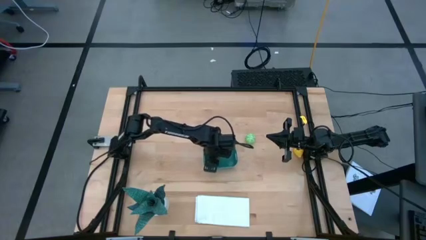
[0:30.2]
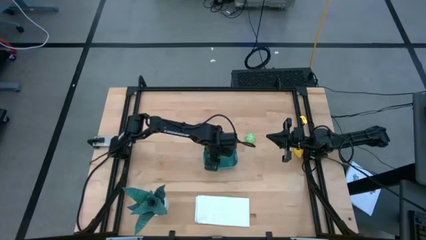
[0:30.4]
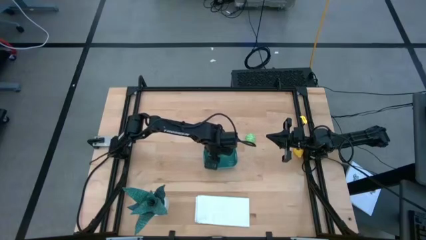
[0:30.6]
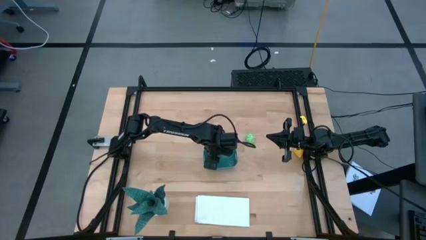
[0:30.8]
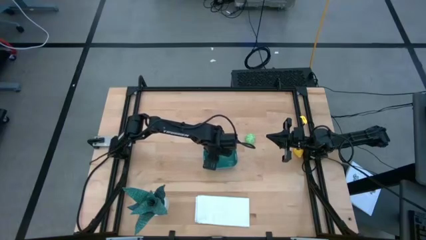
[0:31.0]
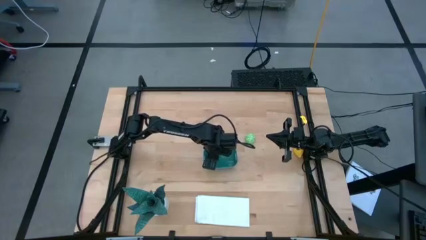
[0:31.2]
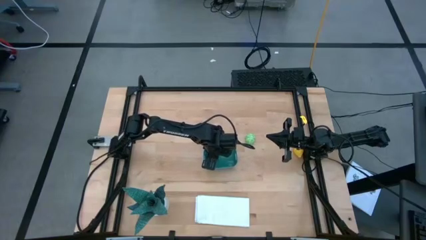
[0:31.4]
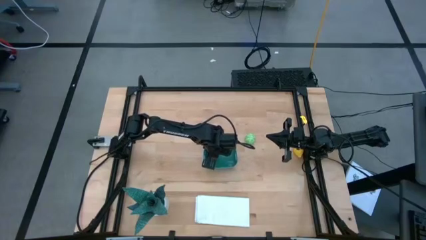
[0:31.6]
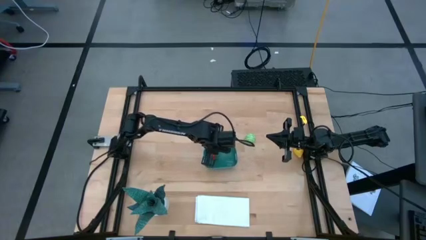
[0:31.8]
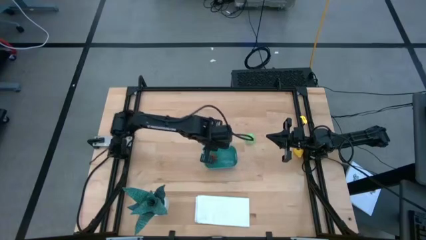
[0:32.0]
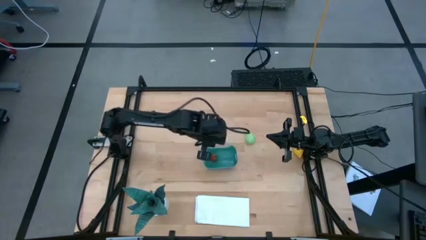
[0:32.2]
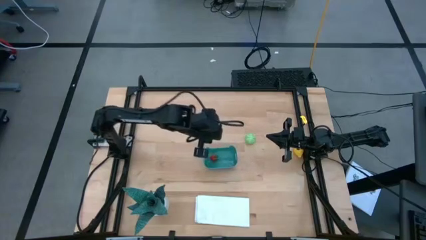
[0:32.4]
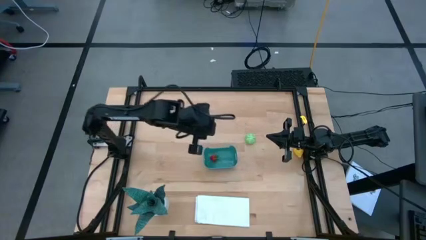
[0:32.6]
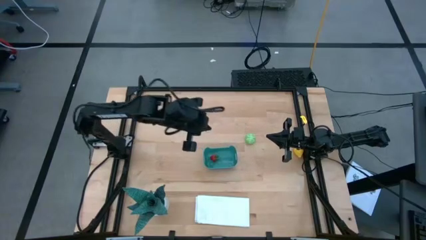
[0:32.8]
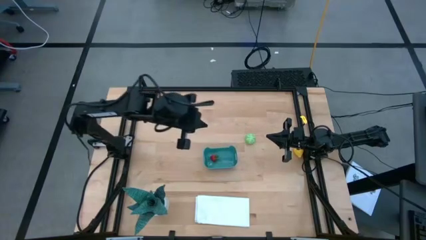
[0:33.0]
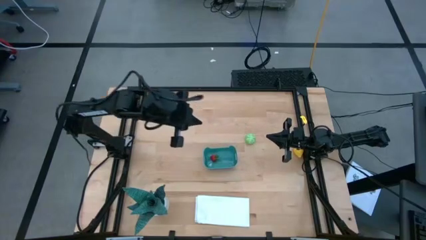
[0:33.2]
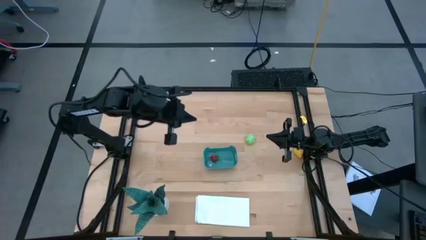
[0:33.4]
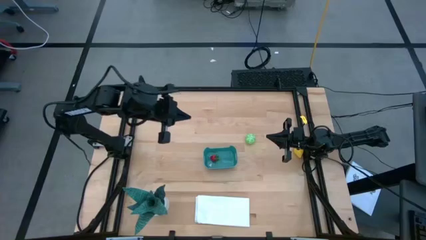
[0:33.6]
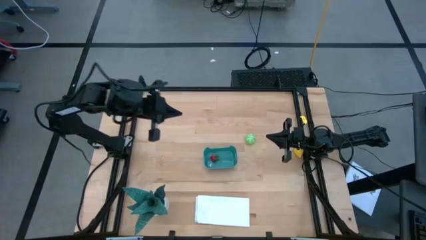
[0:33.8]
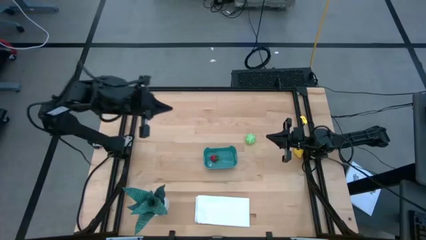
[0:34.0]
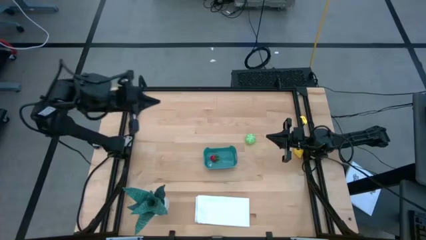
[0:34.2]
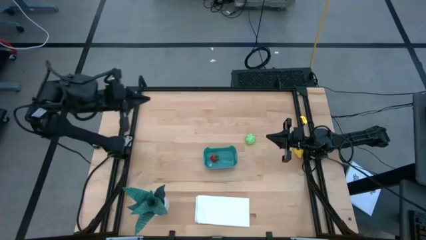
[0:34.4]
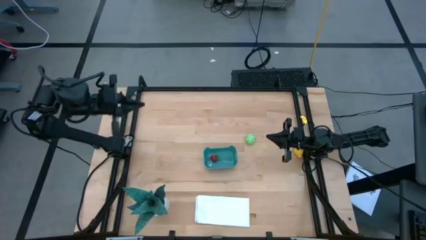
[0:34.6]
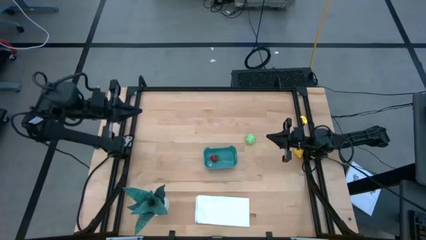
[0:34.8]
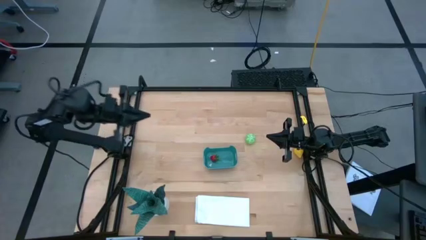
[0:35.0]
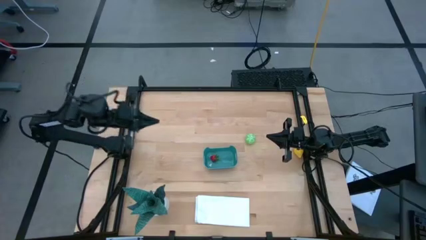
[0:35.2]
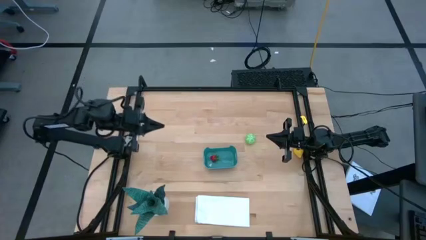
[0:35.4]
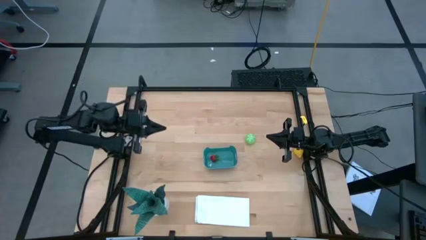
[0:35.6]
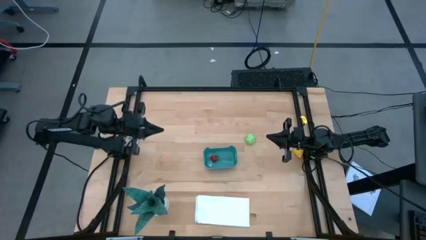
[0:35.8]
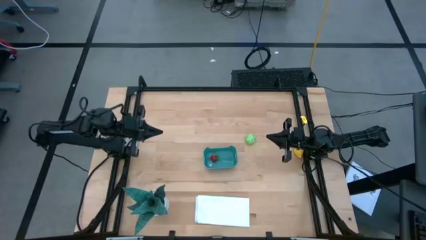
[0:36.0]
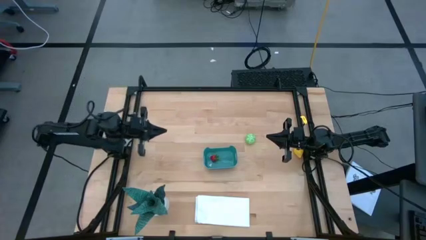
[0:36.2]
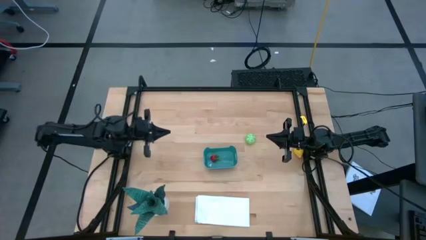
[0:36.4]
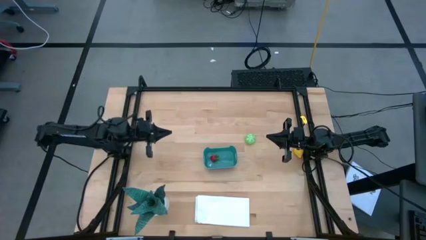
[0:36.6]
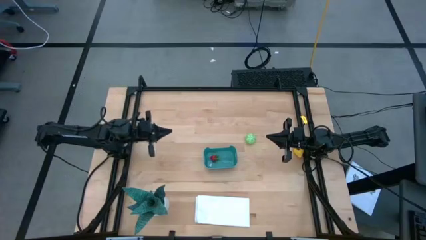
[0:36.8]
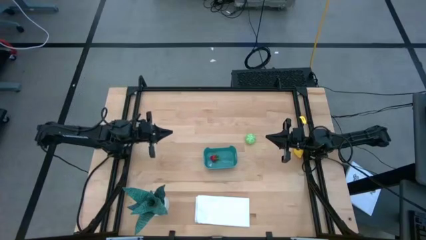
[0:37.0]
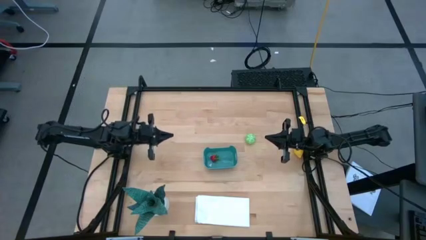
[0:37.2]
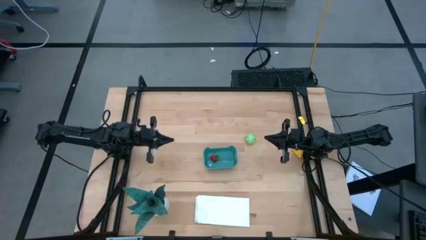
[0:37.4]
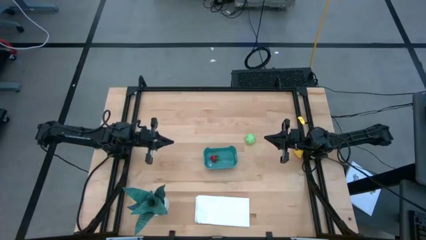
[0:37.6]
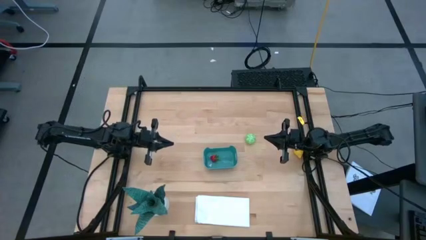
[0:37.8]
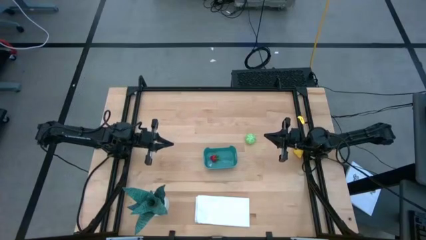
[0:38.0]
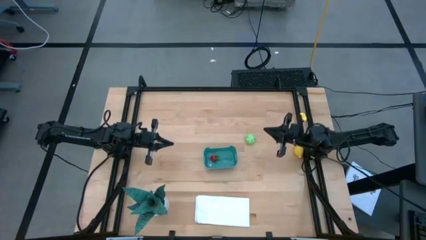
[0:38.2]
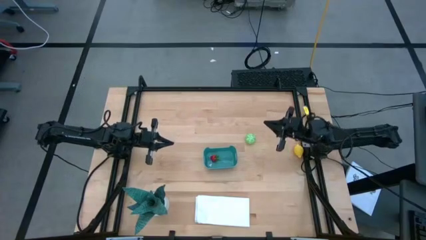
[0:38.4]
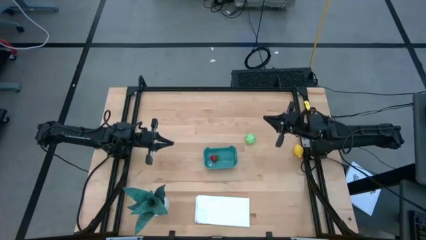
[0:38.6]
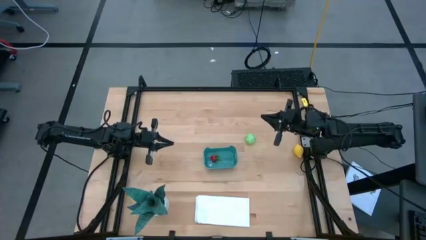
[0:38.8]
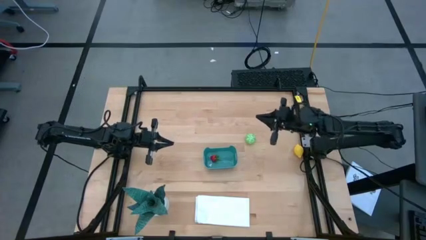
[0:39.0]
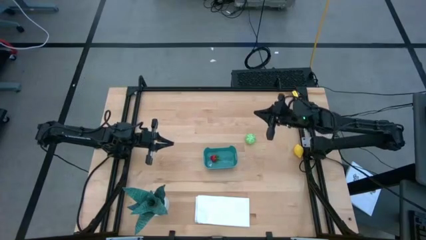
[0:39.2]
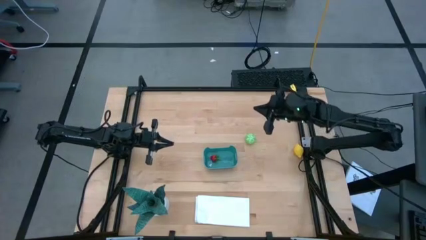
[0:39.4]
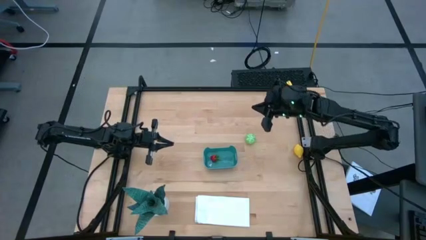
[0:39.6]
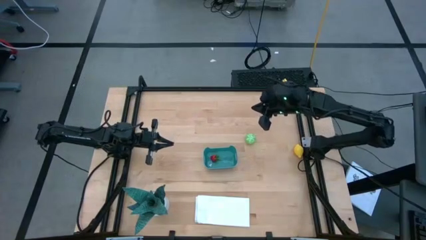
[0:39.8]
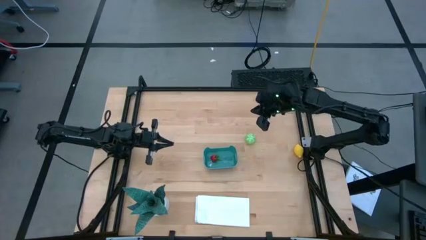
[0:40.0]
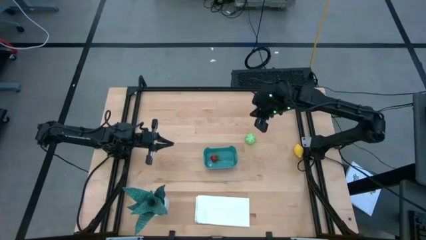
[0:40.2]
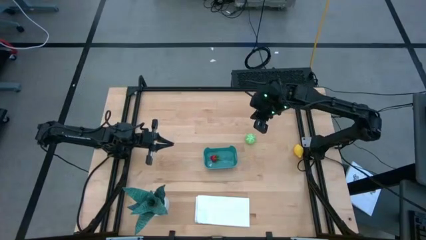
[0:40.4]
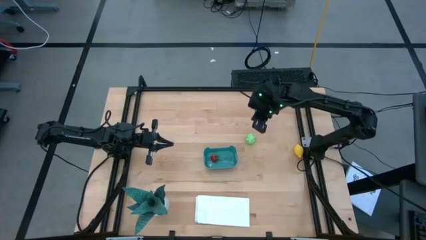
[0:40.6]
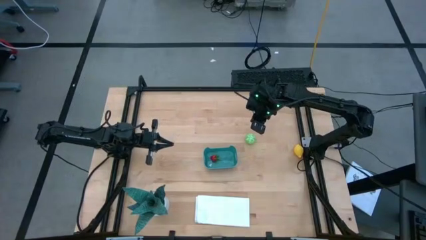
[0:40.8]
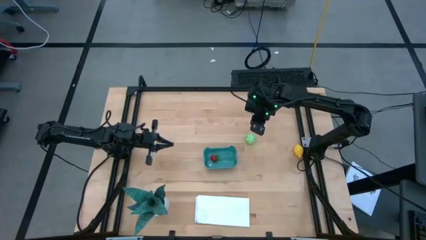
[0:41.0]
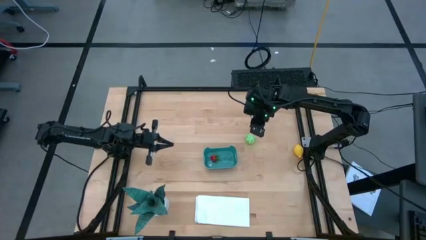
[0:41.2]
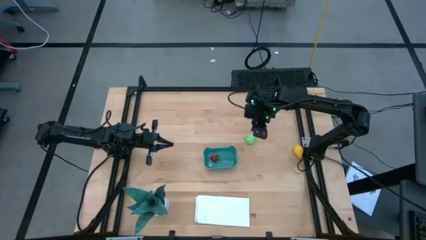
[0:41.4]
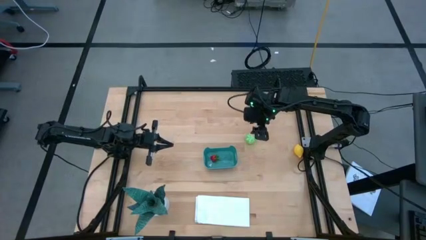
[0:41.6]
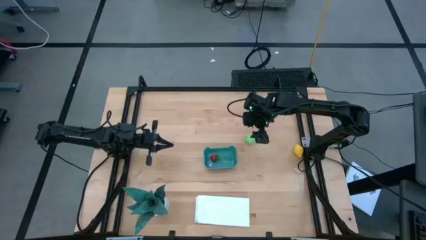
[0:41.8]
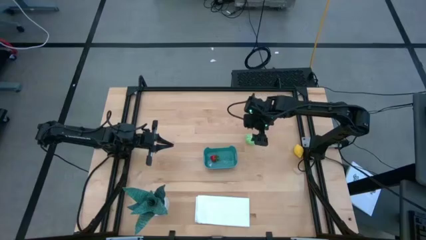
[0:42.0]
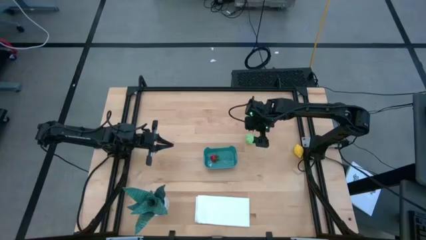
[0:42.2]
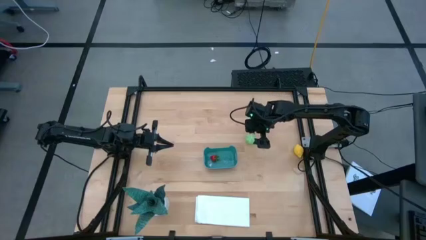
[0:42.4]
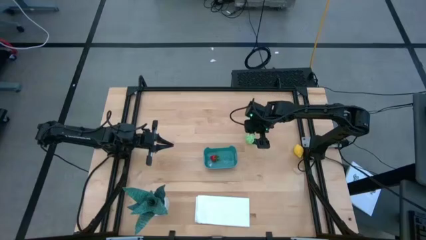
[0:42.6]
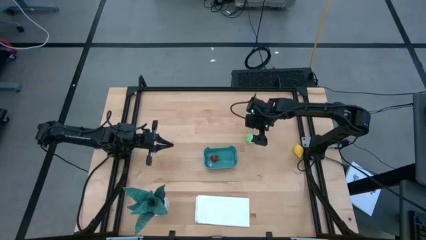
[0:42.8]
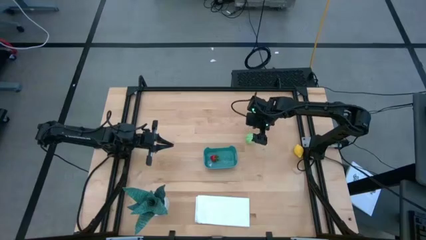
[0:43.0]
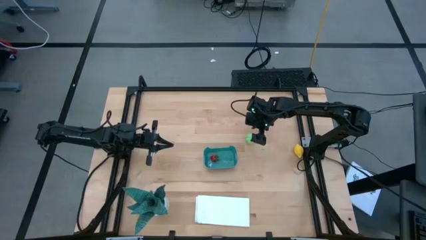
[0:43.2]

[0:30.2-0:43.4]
Task: Pick and placing Produce into tupperware
Put the green cabbage into the blue bin

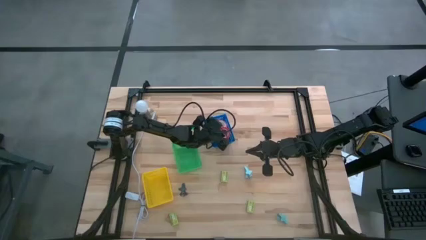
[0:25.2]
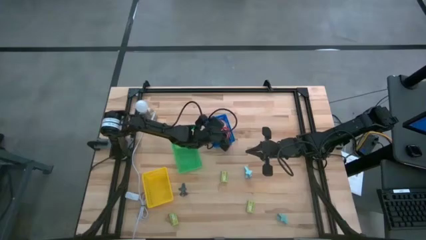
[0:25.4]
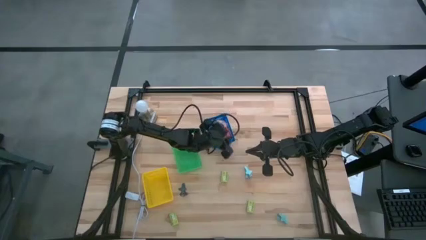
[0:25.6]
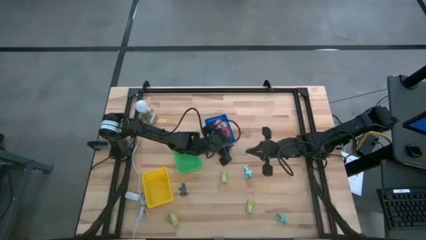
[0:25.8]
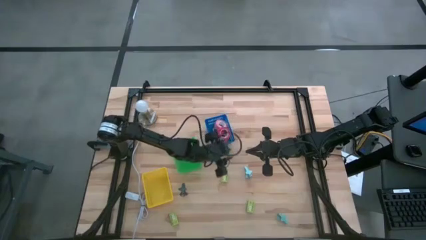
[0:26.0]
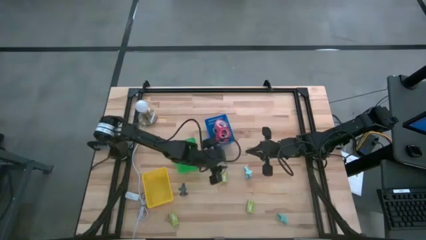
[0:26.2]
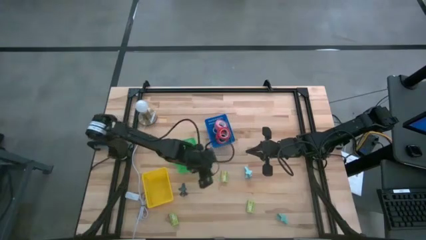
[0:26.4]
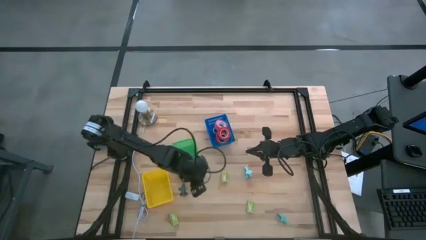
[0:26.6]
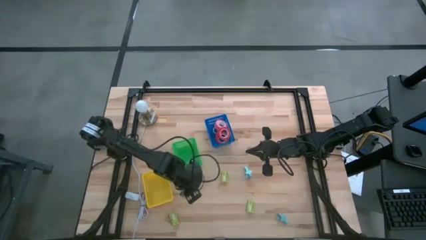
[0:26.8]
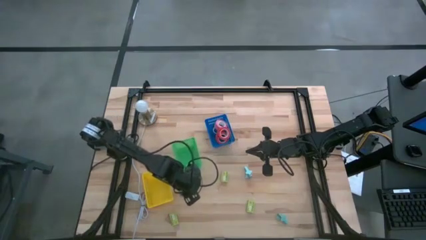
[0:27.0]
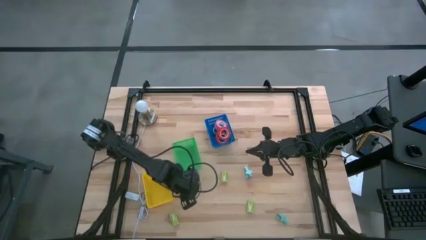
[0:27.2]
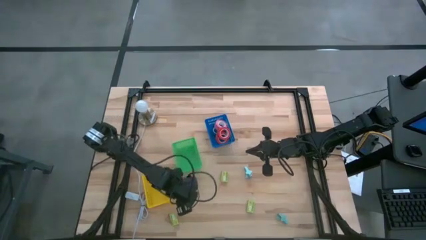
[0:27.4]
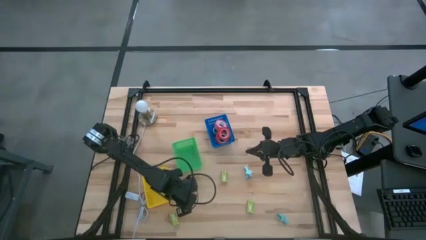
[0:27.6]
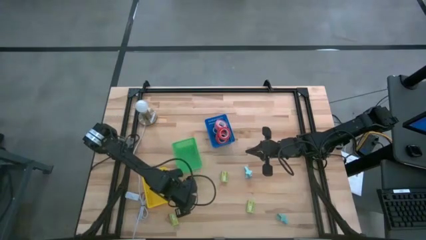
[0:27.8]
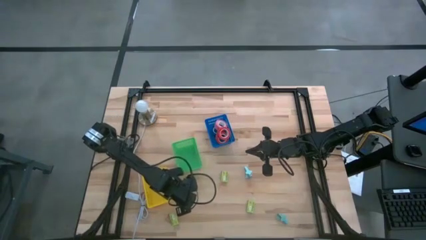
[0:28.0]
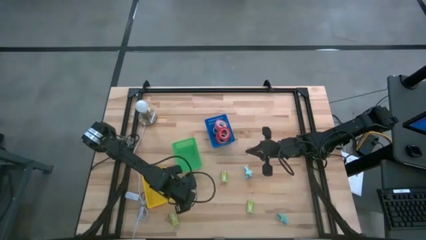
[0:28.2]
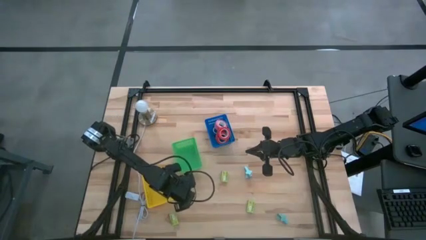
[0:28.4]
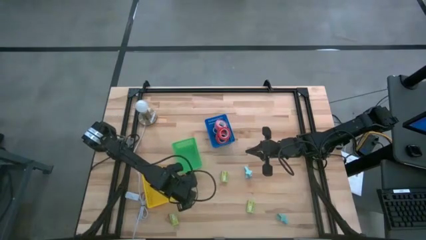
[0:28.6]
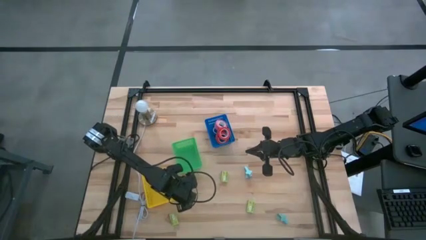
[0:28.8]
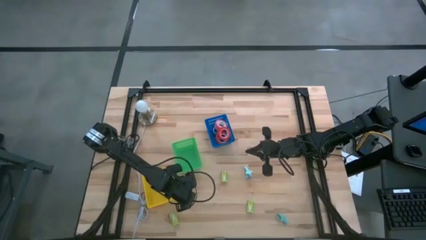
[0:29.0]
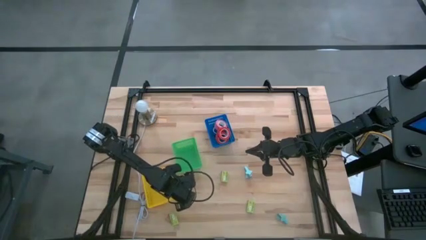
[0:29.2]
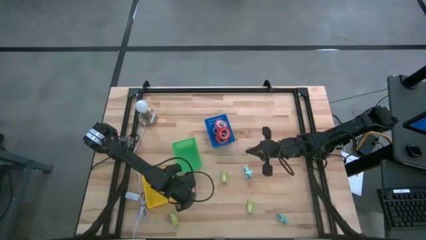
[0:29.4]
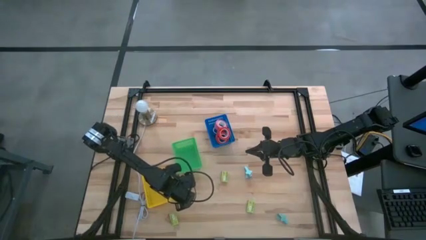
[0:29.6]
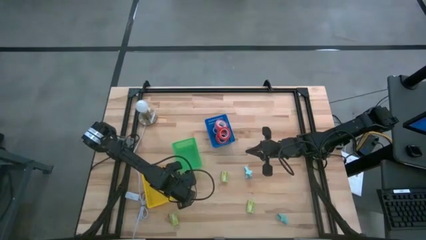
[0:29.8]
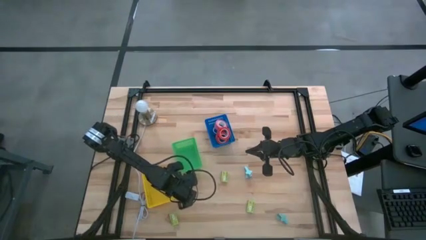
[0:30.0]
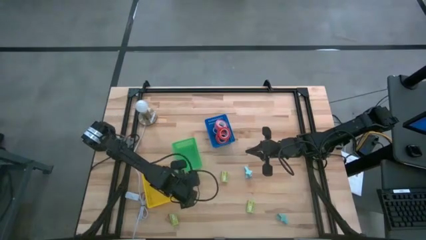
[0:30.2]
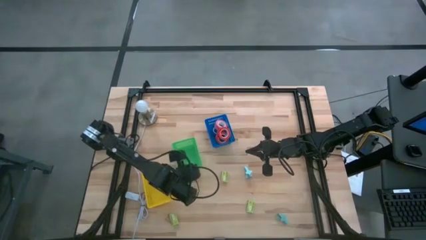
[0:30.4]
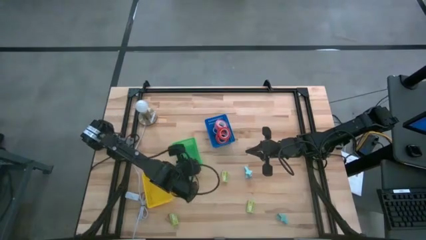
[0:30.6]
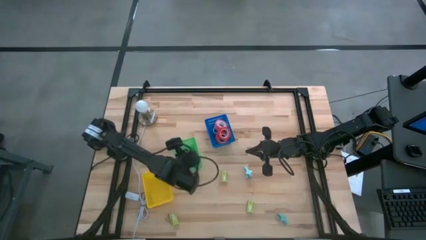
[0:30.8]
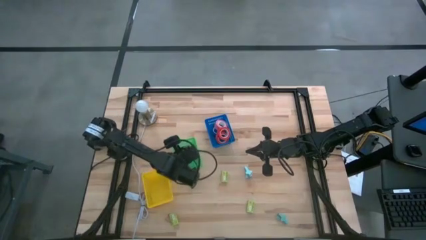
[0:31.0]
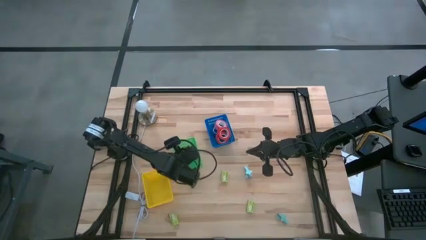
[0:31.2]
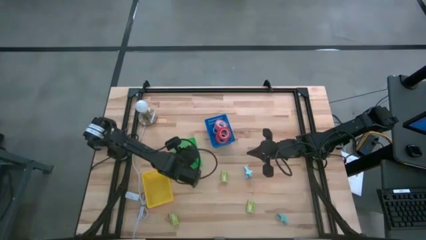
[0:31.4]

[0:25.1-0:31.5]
Task: Pick and place Stapler, Stapler remover, tape
Put the blue staple remover into the green basket
